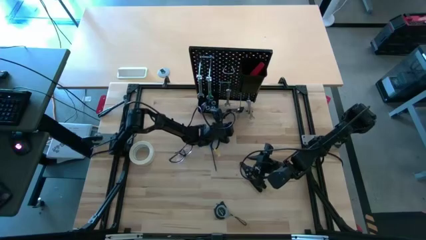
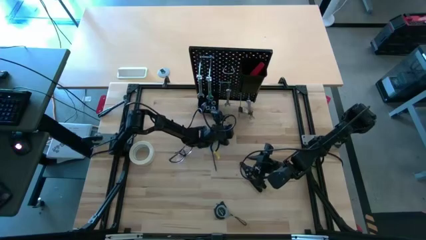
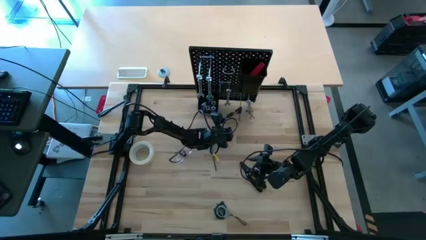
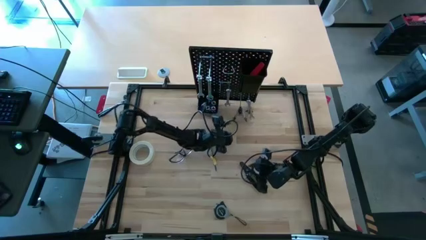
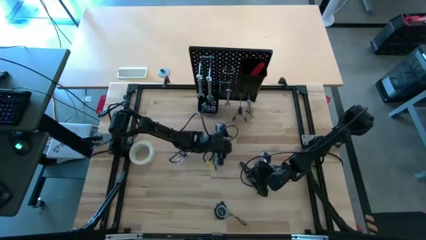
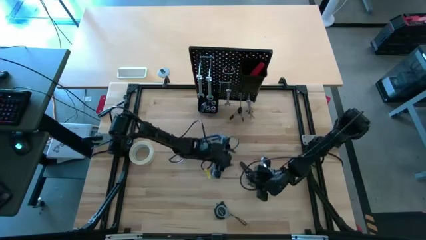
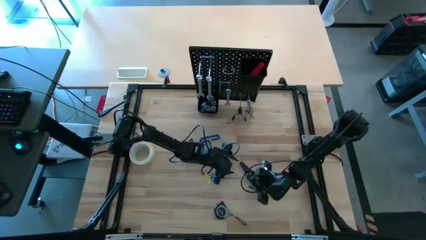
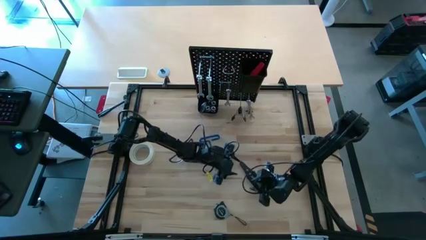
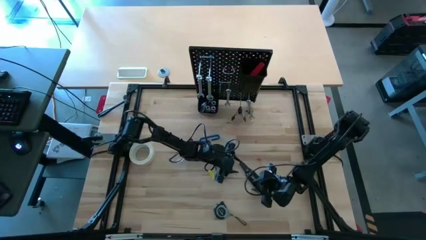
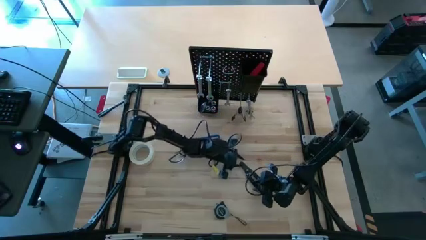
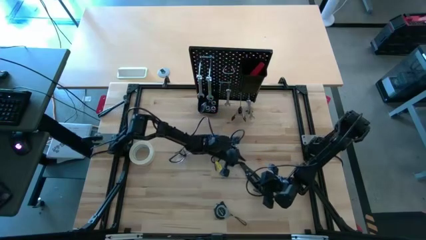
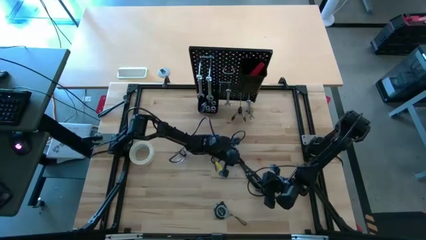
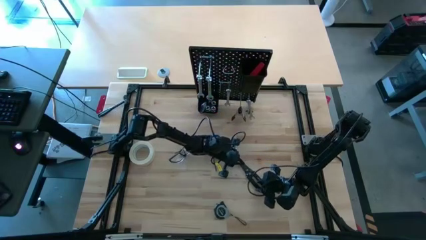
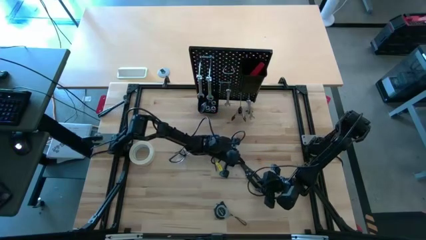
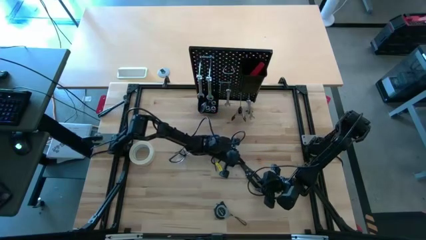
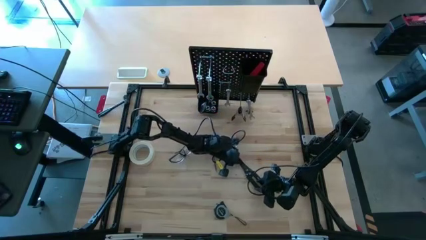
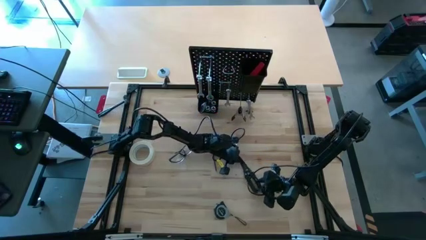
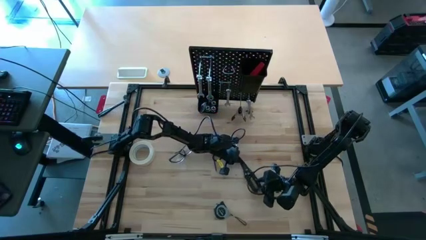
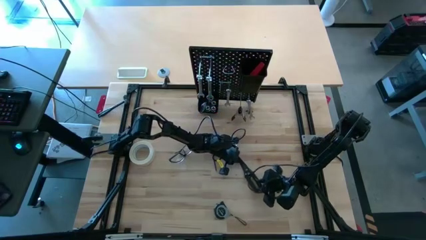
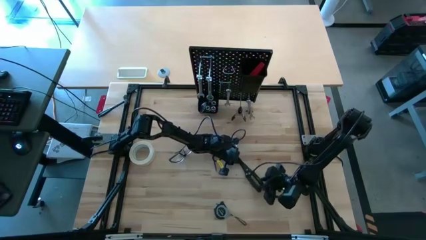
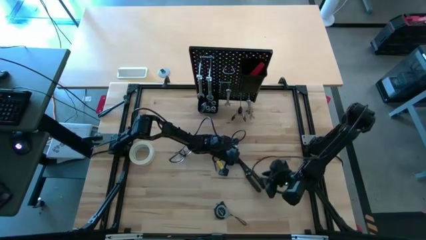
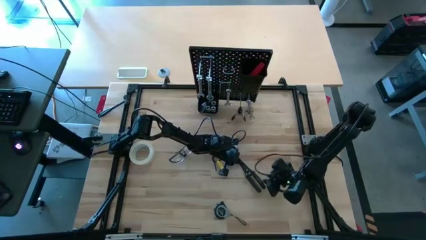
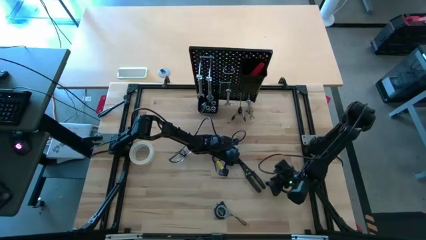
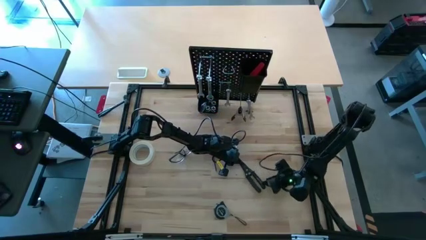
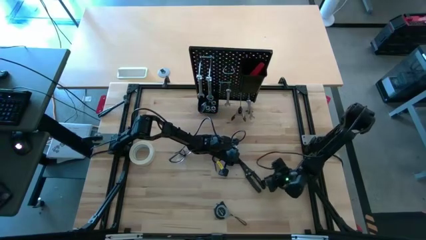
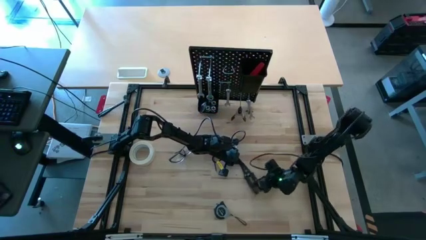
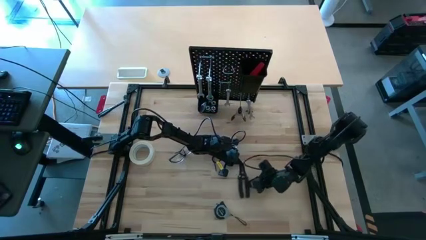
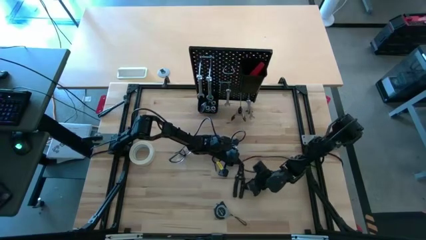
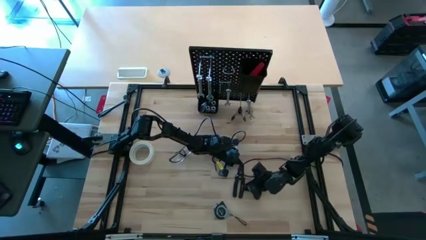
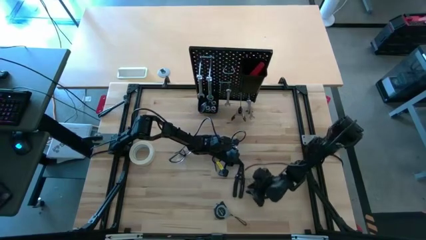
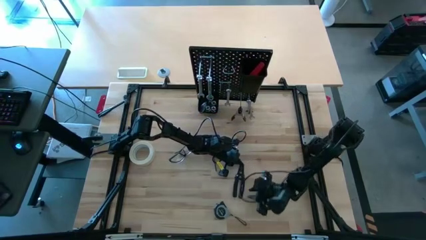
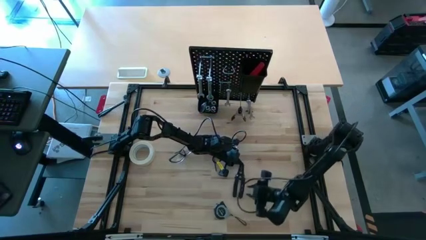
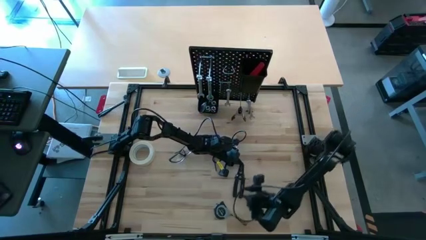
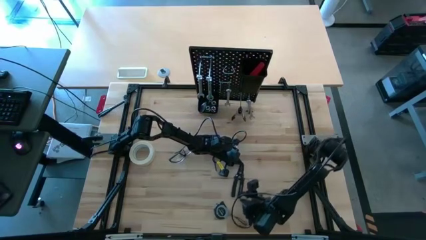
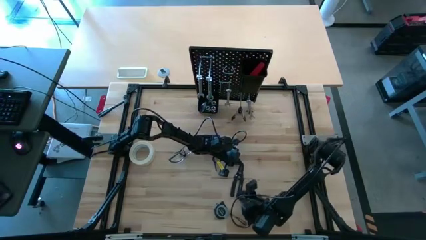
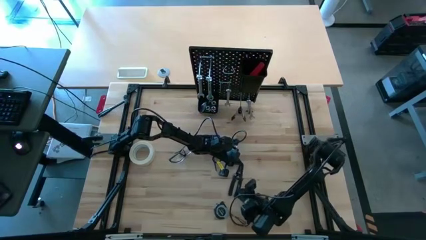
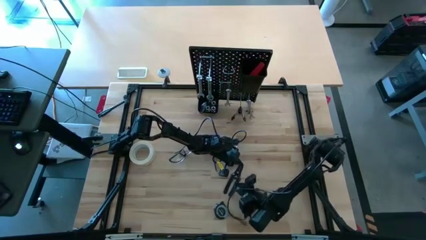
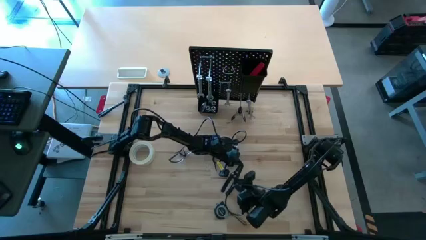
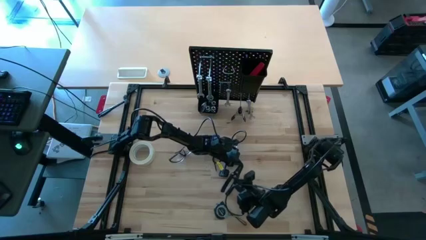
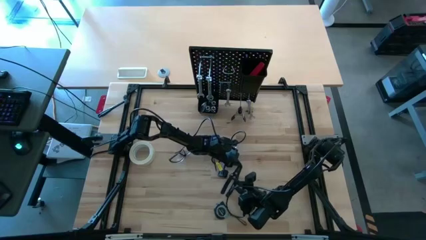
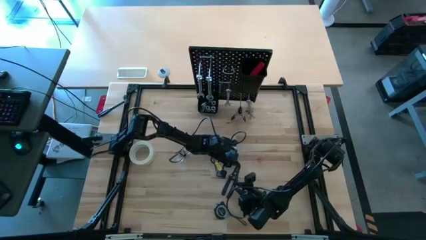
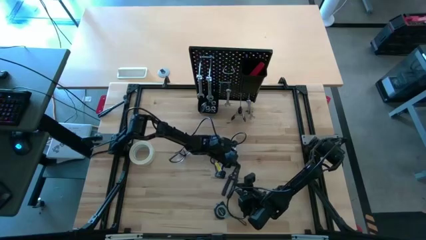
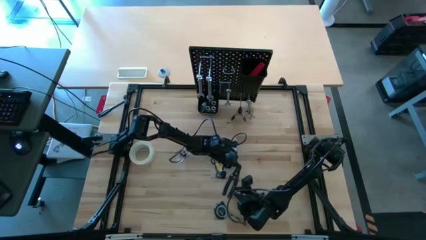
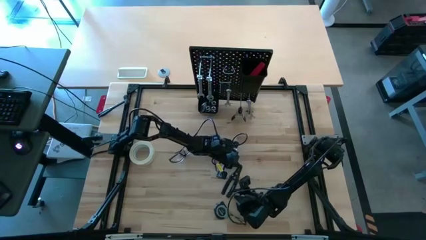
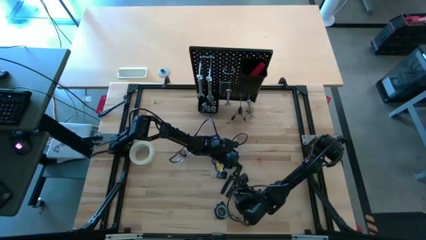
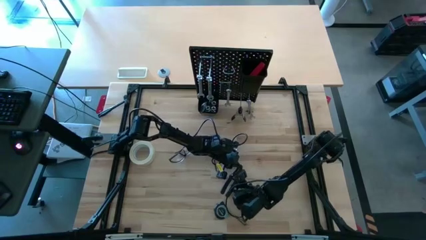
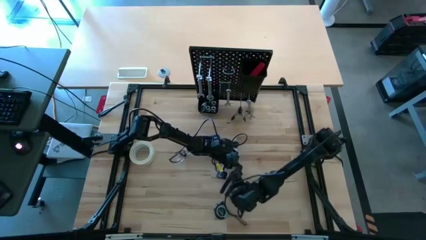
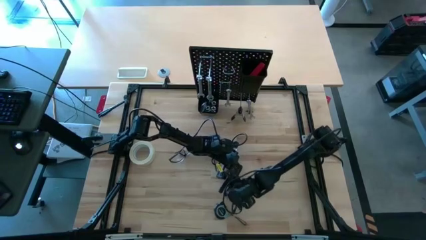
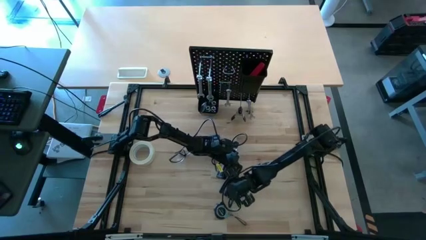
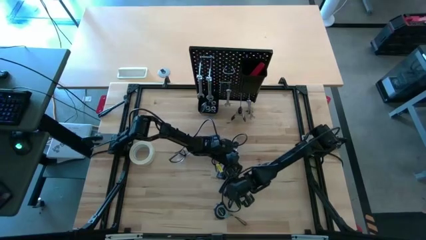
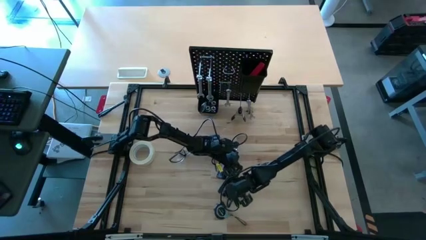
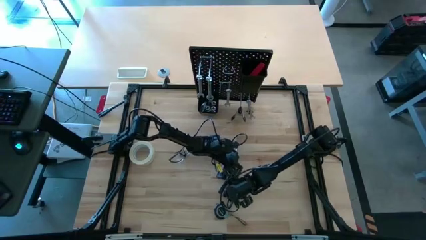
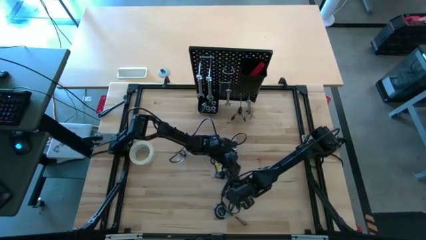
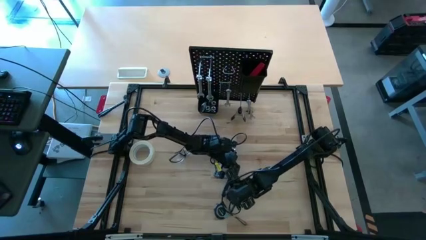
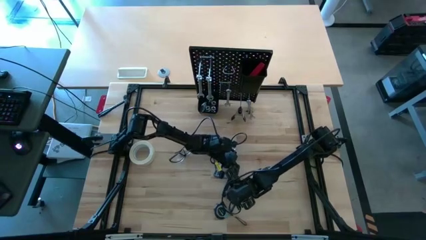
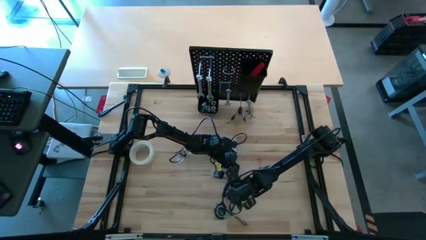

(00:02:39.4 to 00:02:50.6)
Task: Hang tools onto peg board
Hang the wire stripper onto the peg board

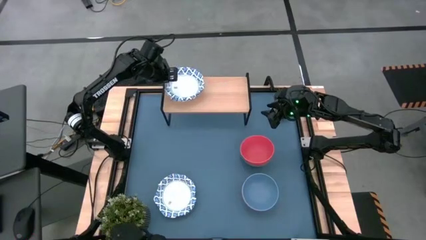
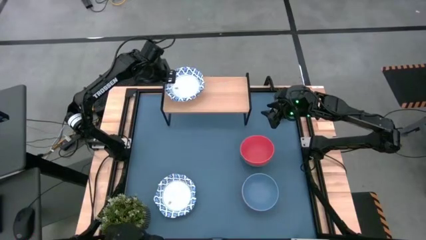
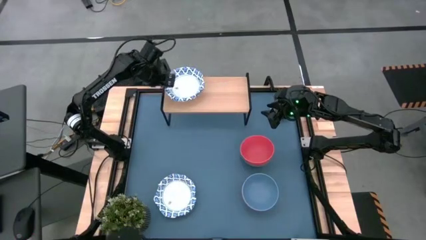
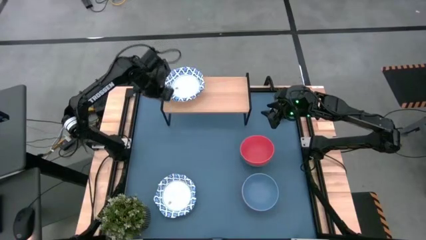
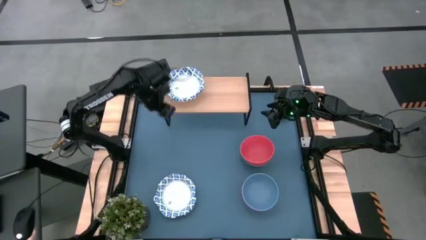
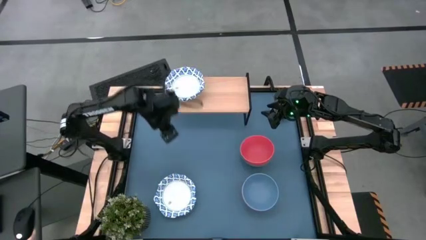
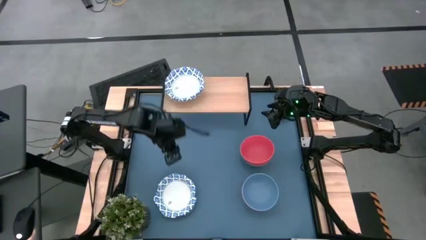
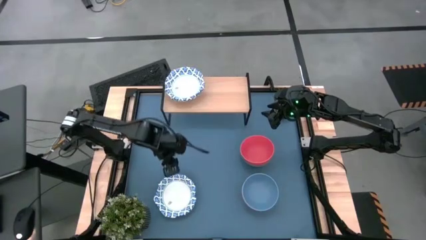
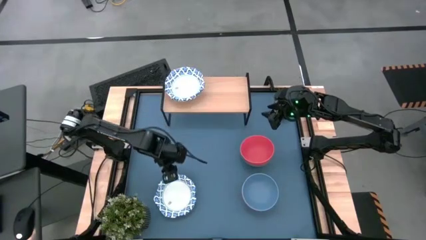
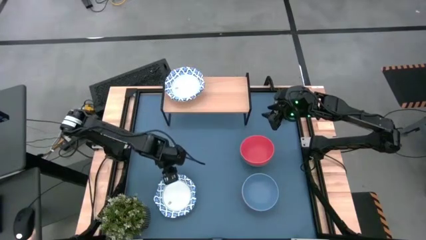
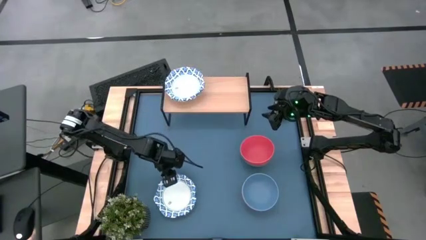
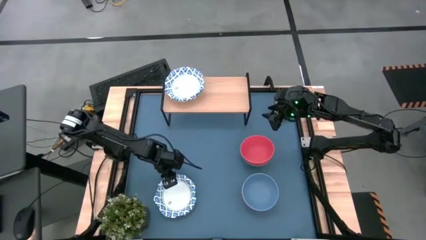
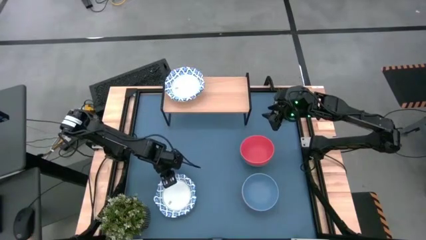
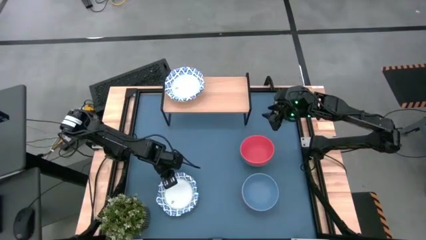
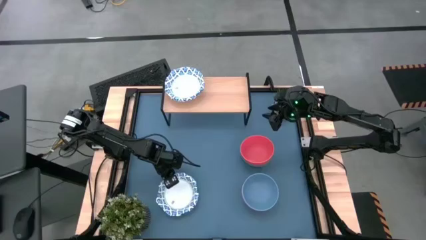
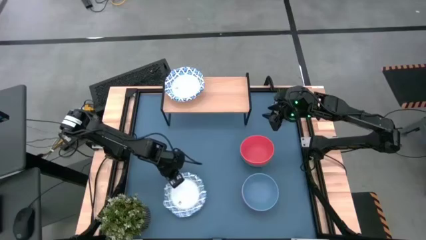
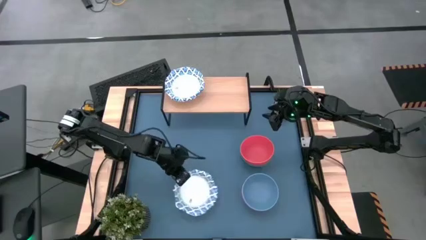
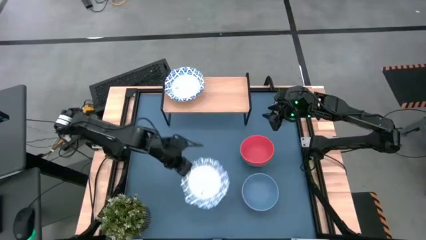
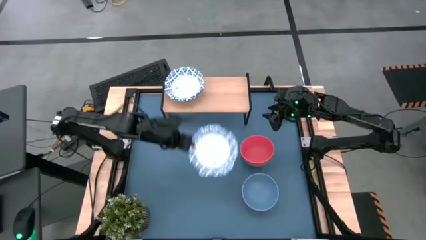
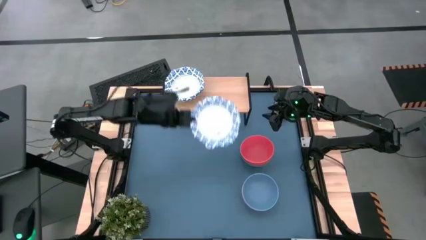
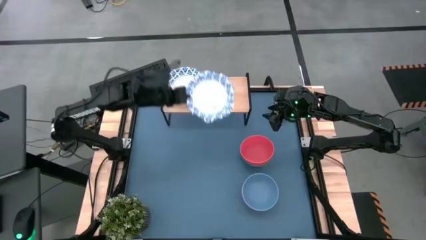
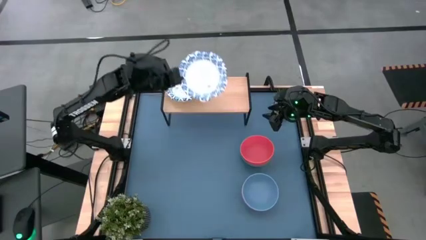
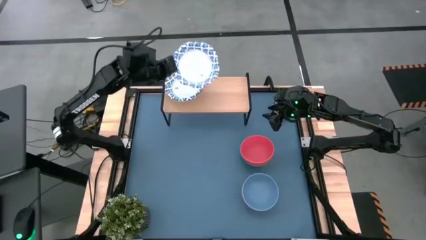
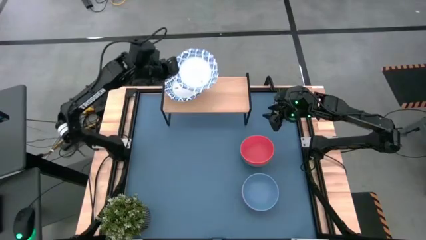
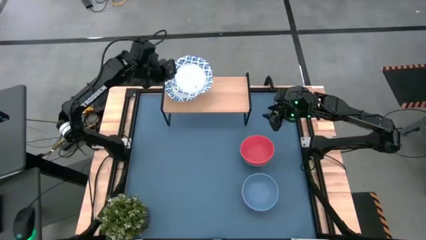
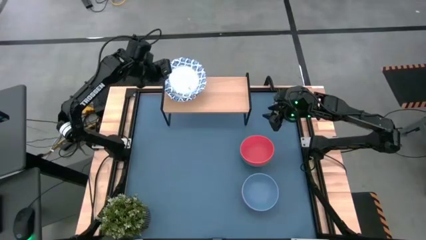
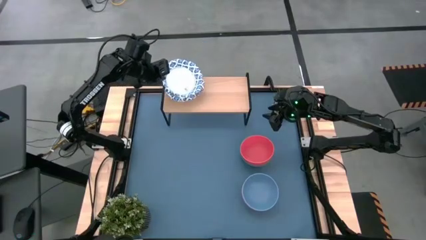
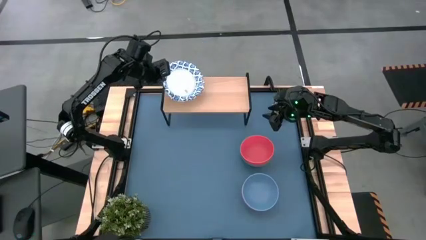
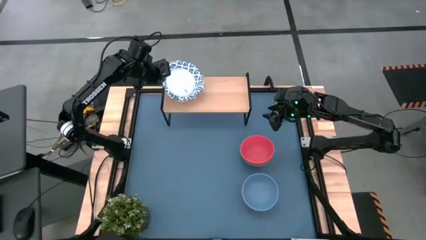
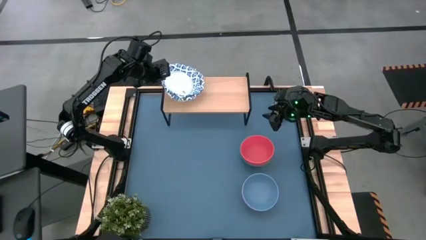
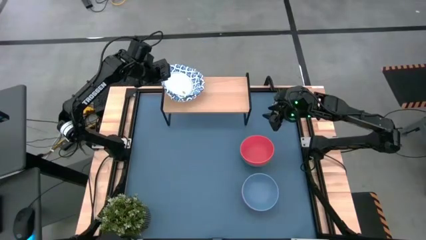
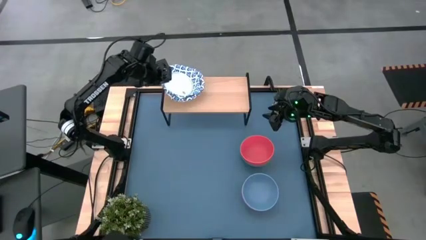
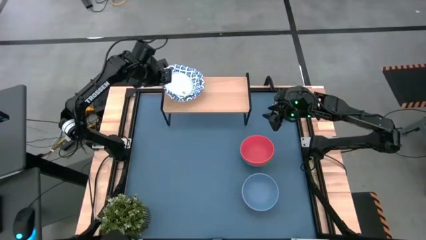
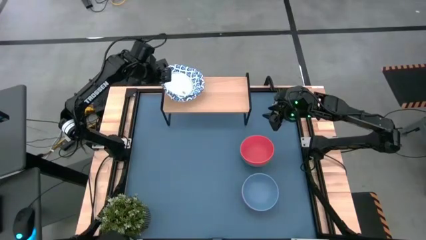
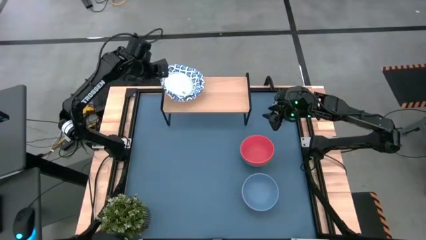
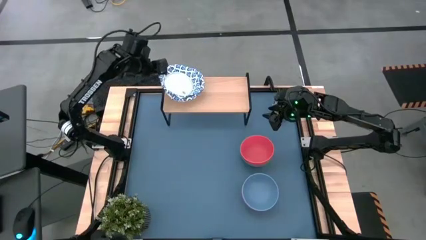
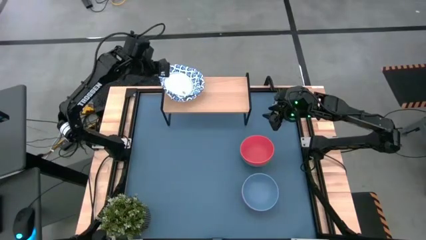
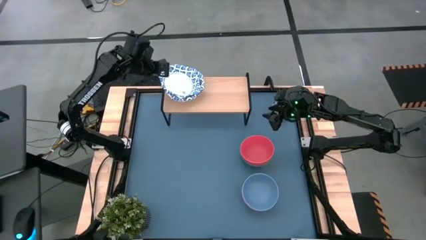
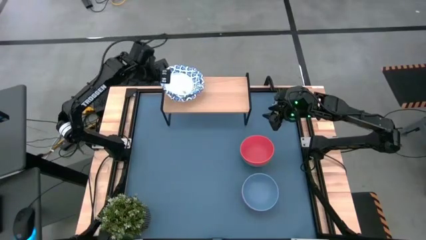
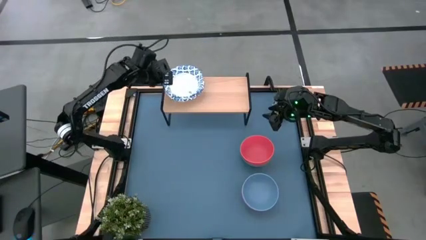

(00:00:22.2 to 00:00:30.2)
Task: Place and stack bowls onto a shelf
Stack the white bowl on the white bowls on the shelf
